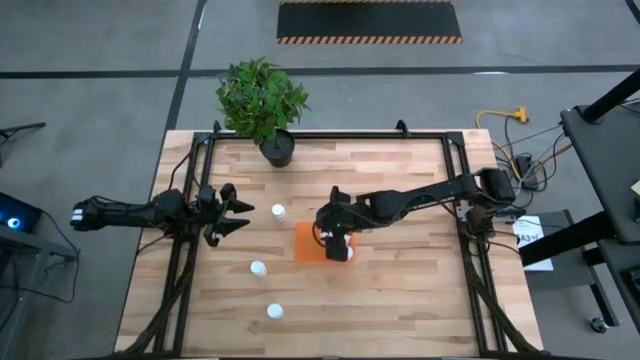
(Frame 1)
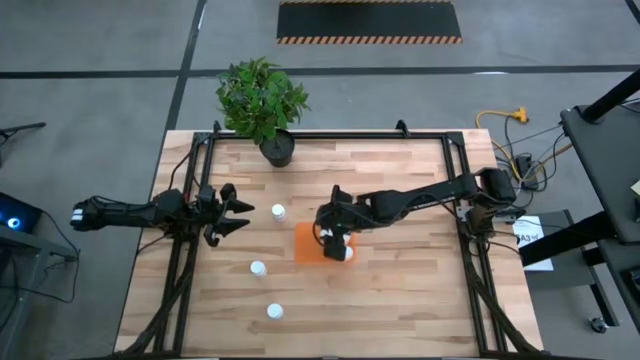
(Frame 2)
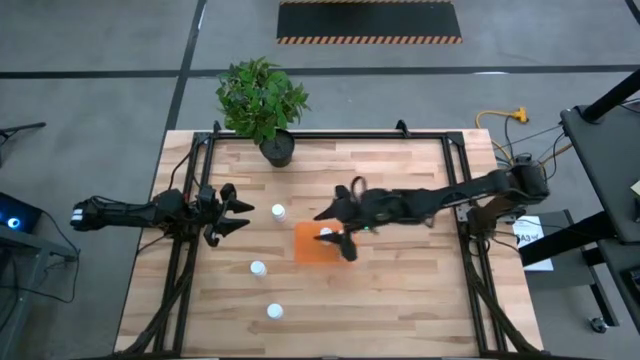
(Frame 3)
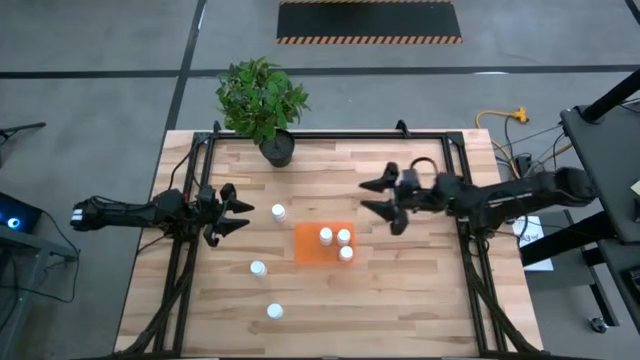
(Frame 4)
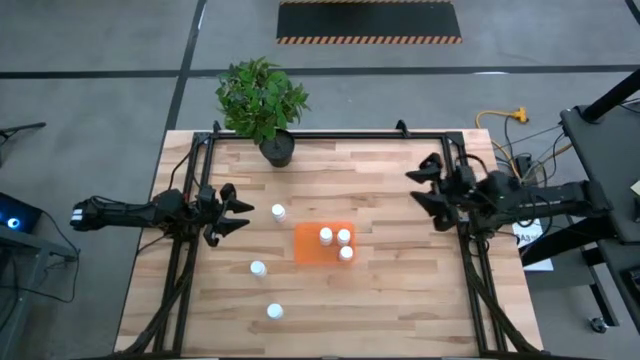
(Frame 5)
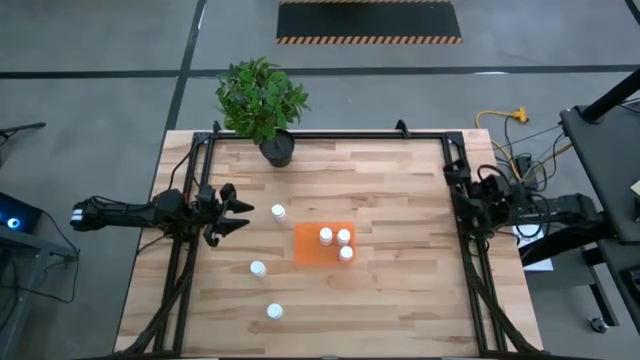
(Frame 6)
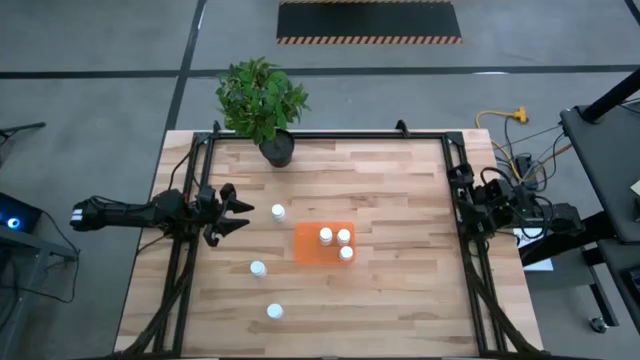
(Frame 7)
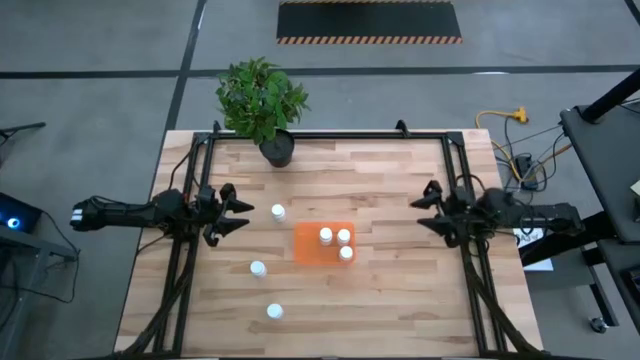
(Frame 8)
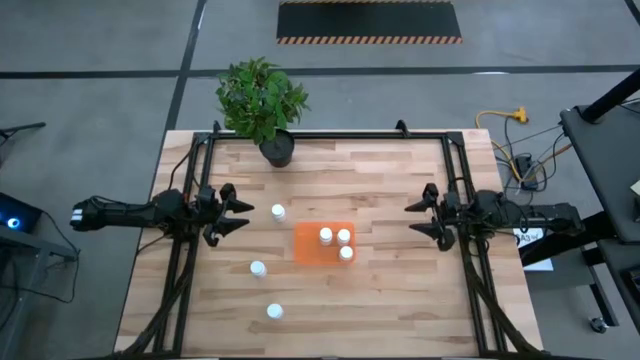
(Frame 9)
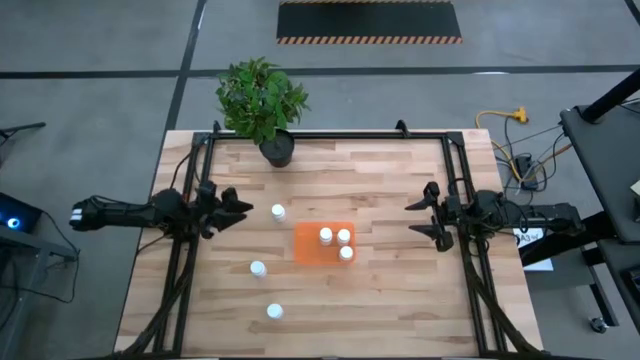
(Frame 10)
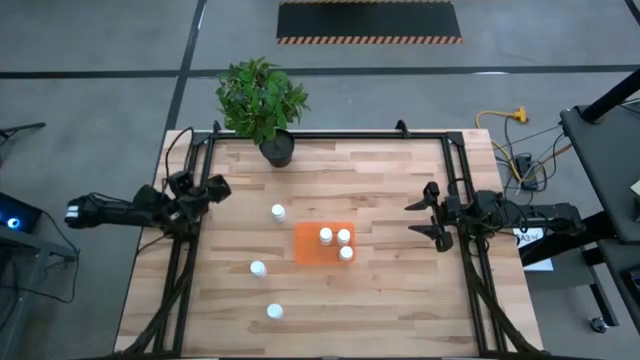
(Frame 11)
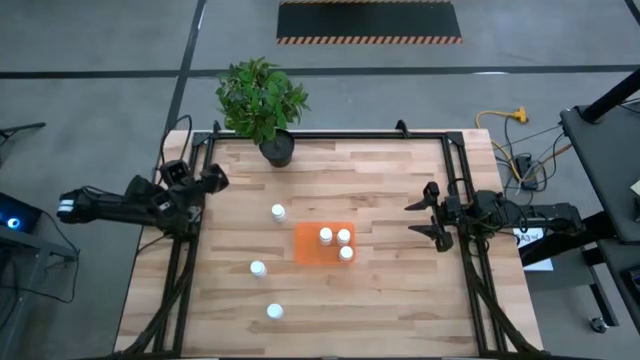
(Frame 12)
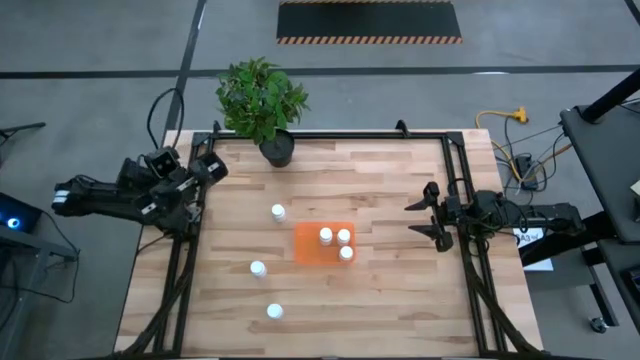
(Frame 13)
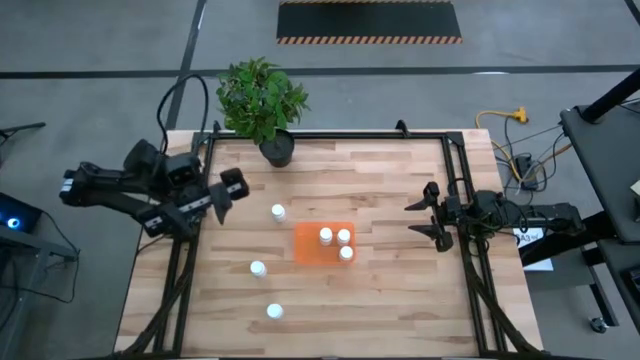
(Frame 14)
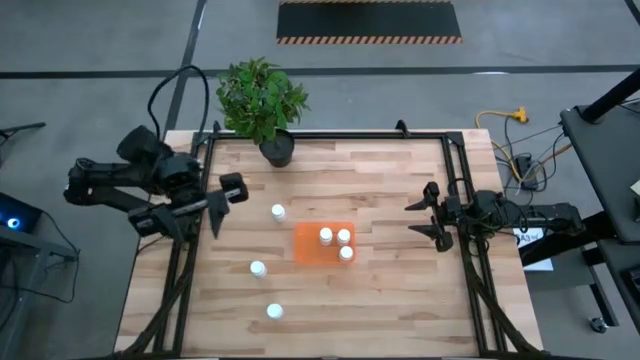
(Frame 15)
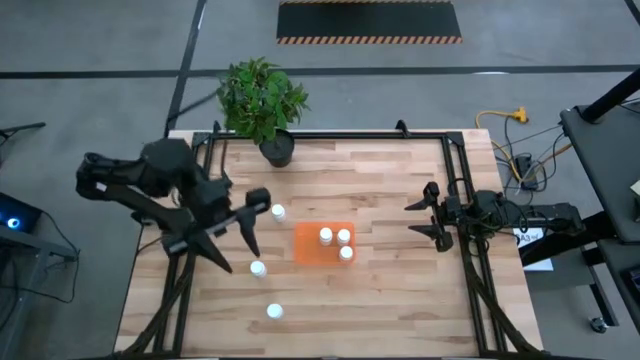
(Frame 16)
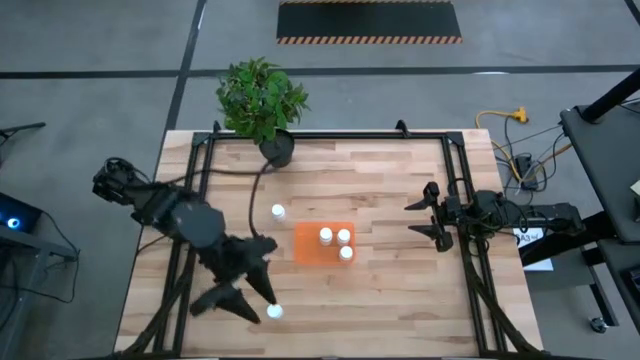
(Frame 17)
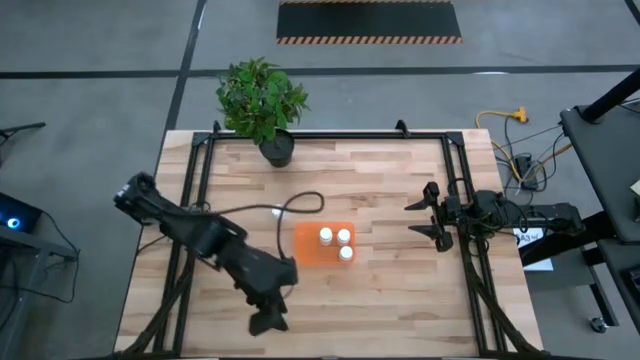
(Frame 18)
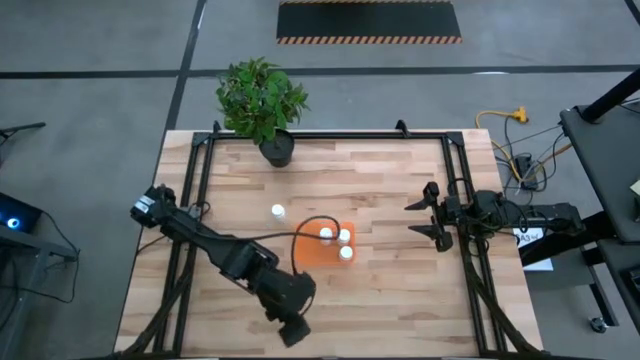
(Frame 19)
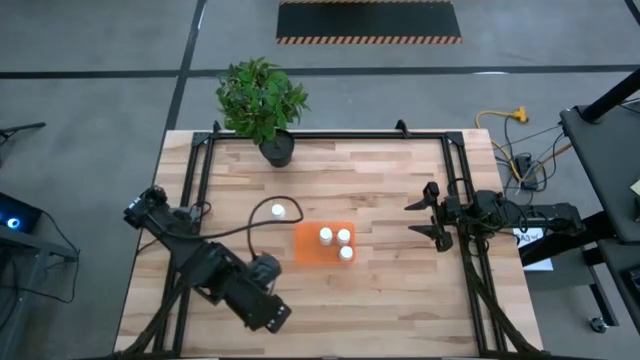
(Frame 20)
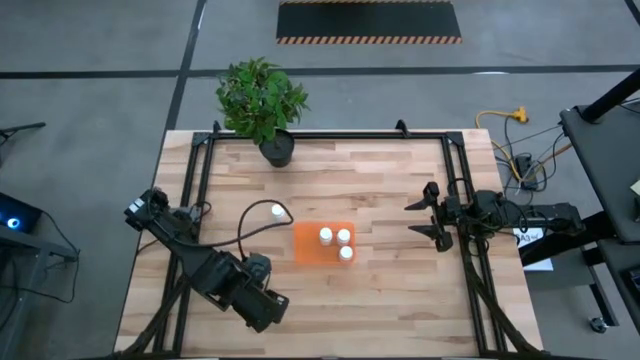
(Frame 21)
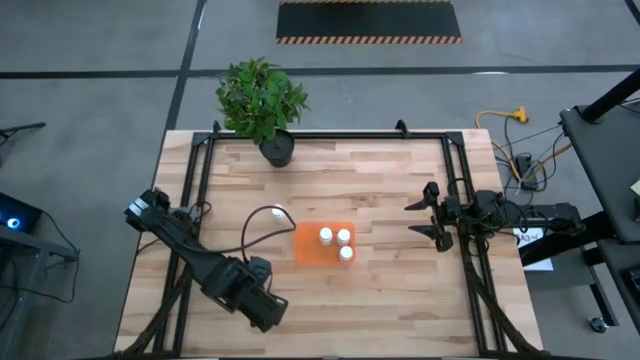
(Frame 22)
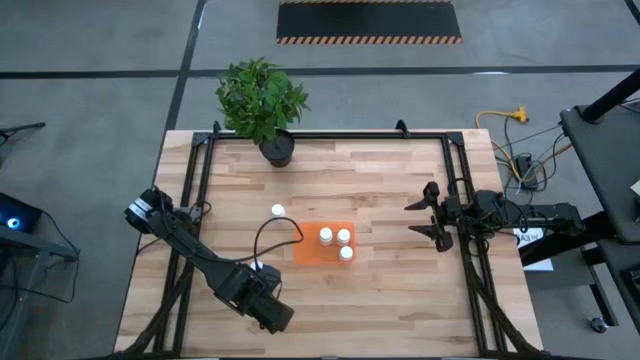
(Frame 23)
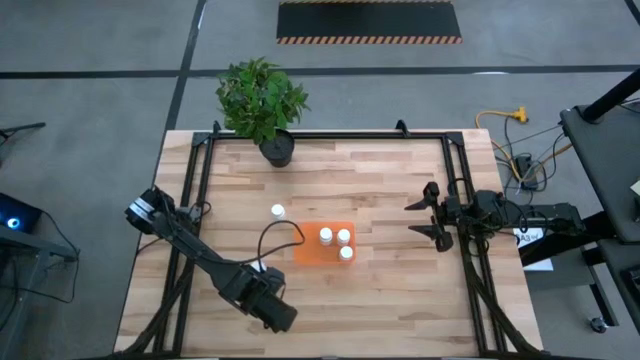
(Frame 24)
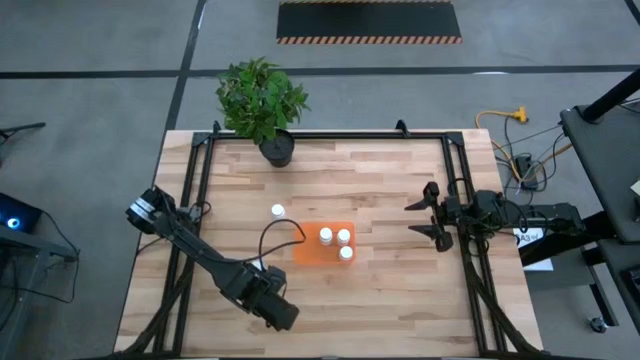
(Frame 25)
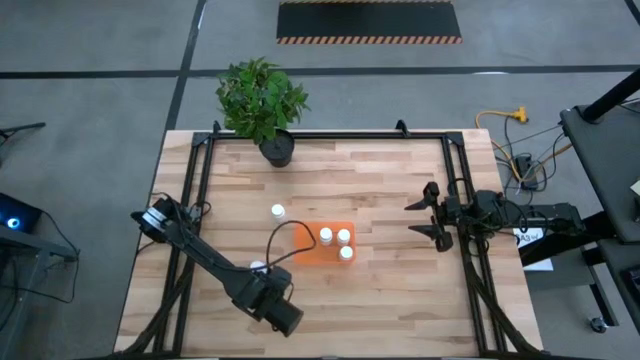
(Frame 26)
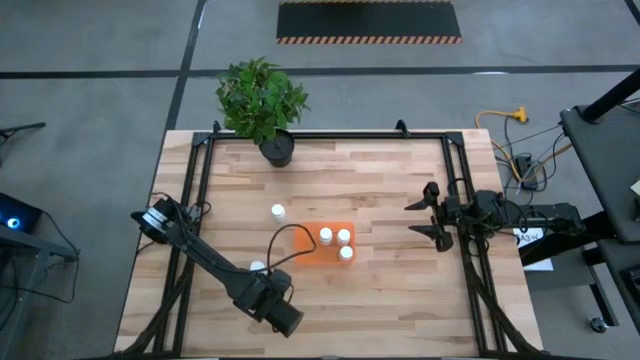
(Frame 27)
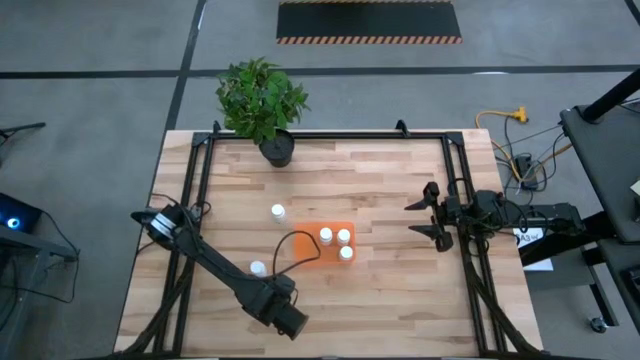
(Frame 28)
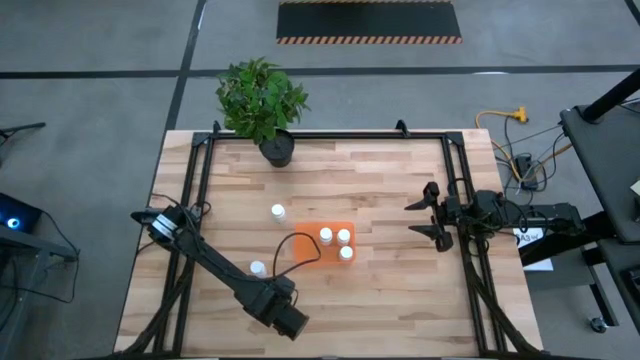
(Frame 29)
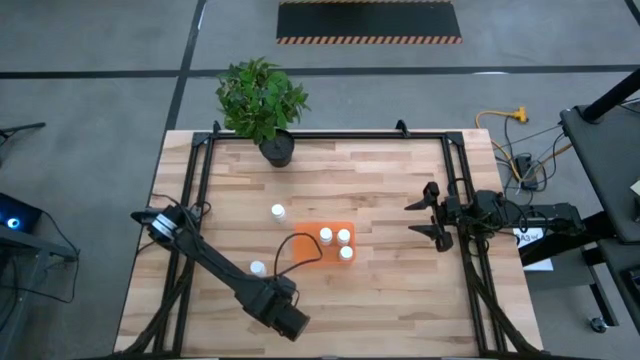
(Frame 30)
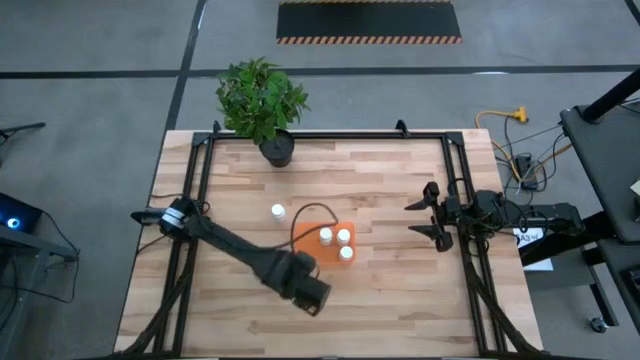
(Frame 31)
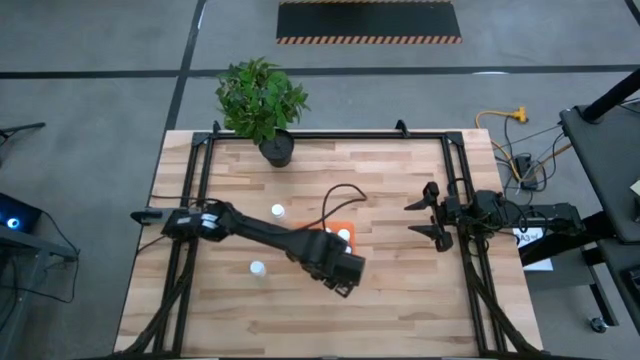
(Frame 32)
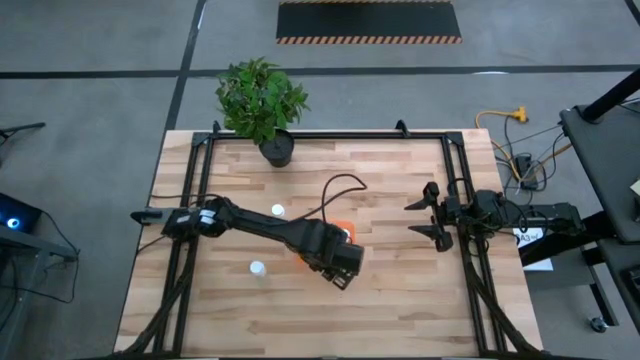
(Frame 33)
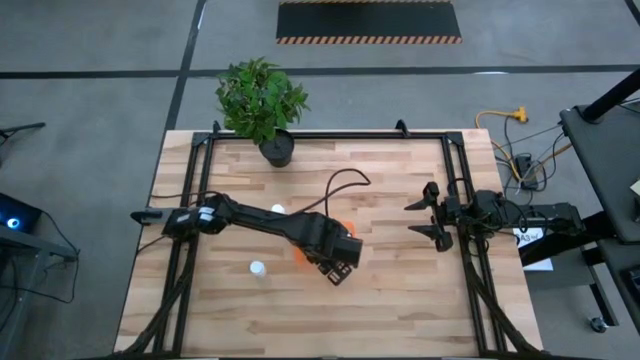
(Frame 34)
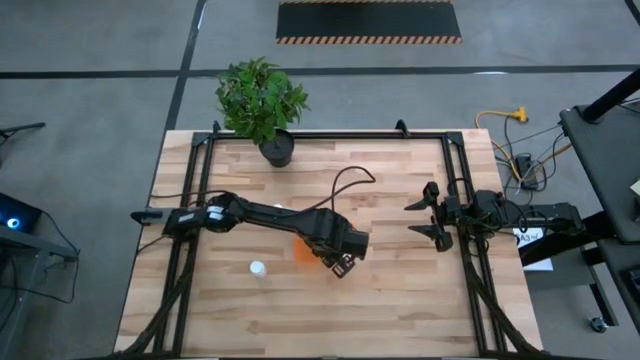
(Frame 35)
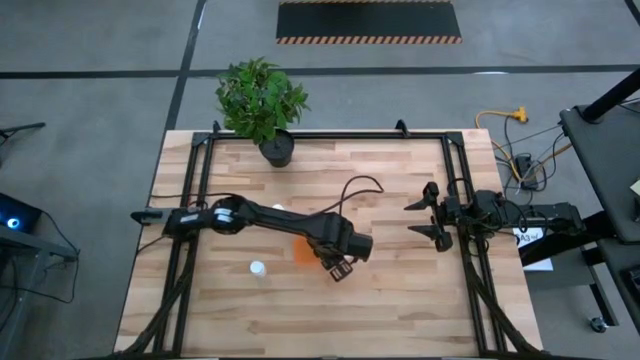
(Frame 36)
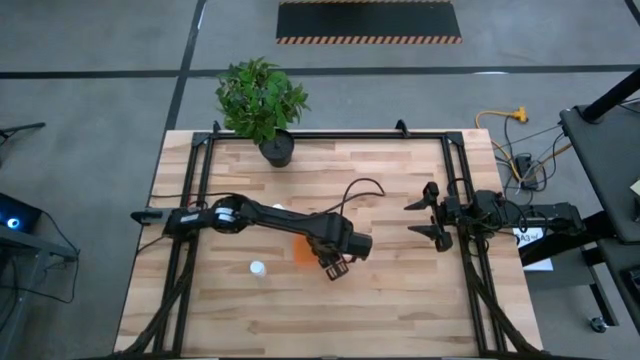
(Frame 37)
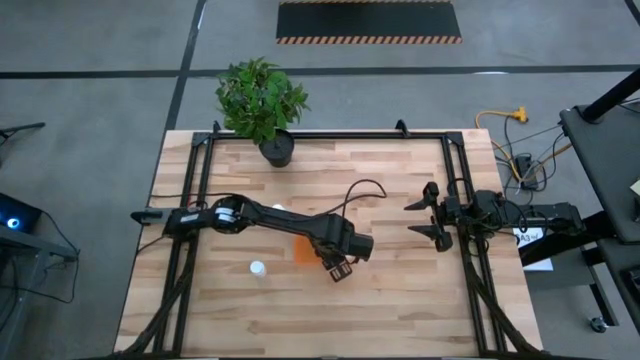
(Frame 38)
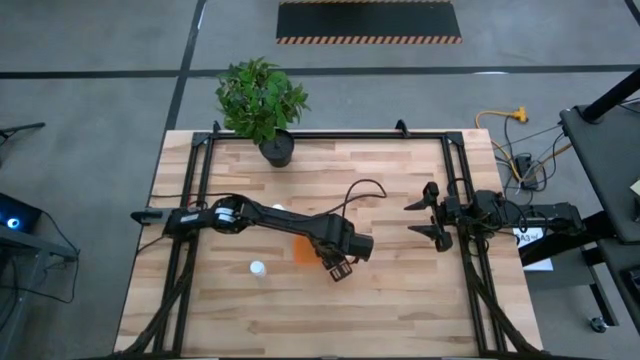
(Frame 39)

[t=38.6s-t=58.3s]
Task: Pick and place pill bottles into a basket
Put the white pill bottle into the orange bin
